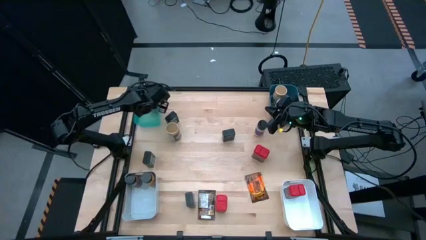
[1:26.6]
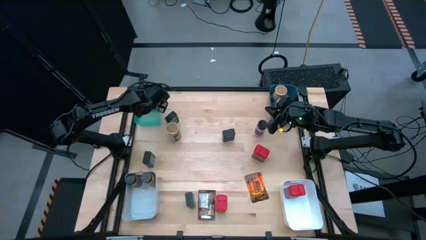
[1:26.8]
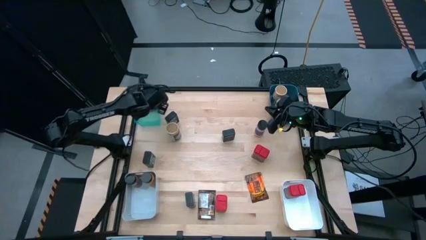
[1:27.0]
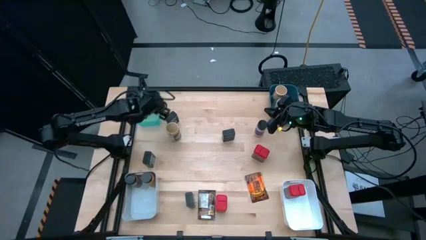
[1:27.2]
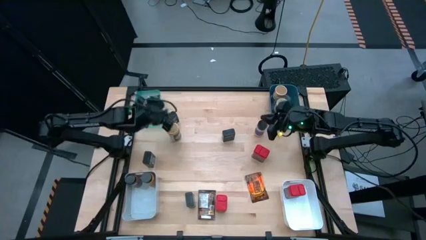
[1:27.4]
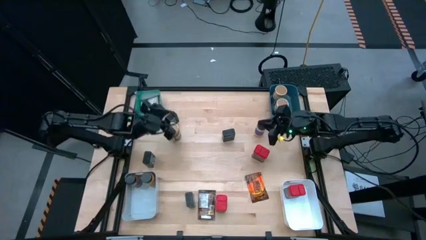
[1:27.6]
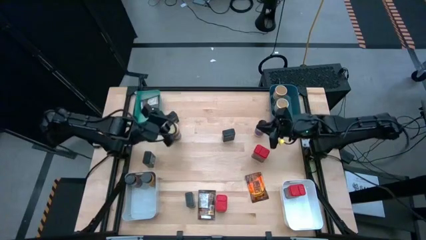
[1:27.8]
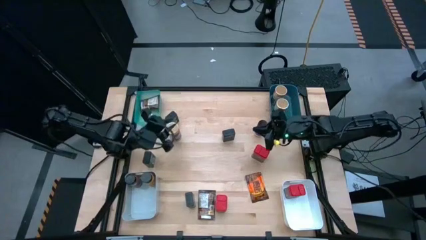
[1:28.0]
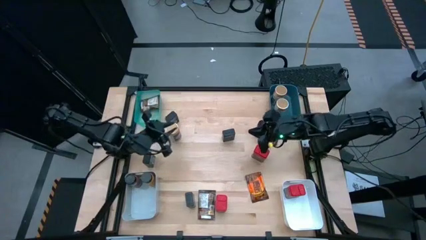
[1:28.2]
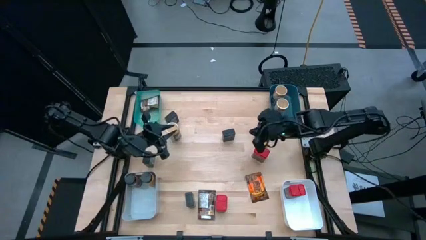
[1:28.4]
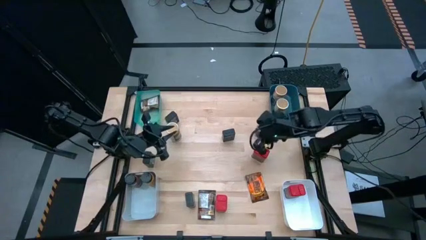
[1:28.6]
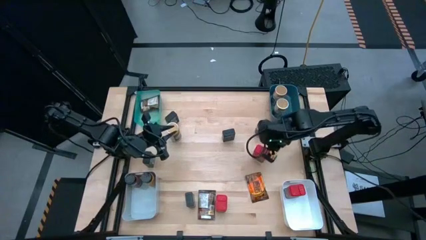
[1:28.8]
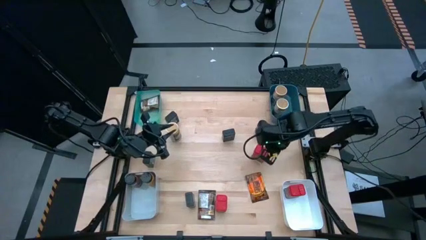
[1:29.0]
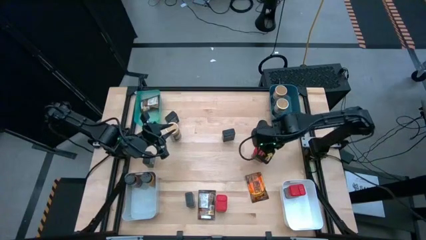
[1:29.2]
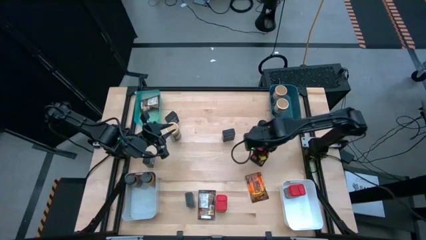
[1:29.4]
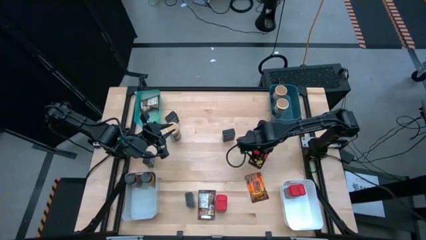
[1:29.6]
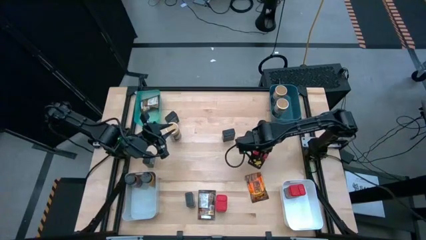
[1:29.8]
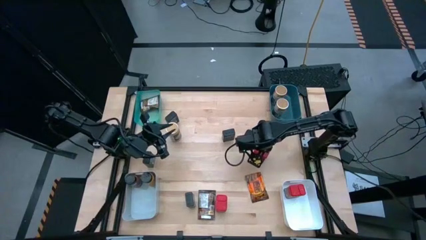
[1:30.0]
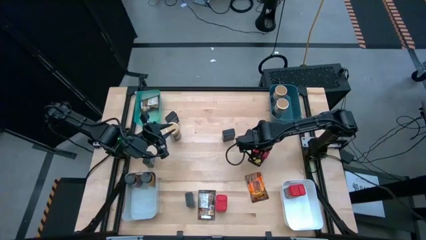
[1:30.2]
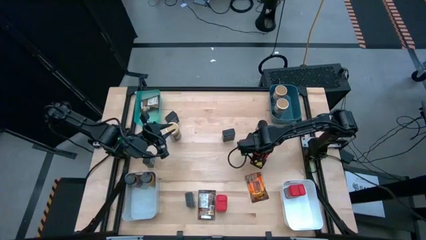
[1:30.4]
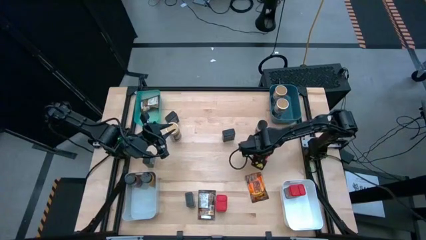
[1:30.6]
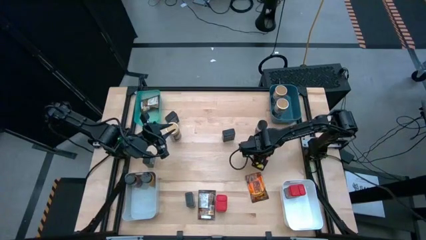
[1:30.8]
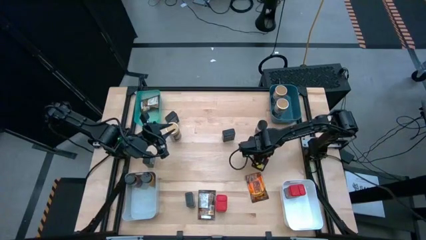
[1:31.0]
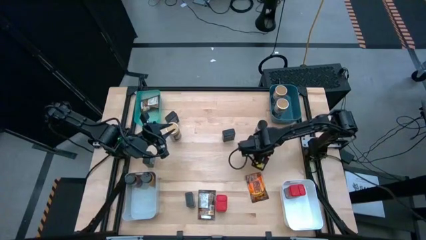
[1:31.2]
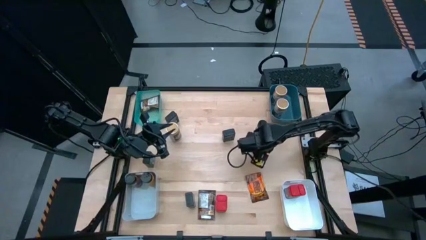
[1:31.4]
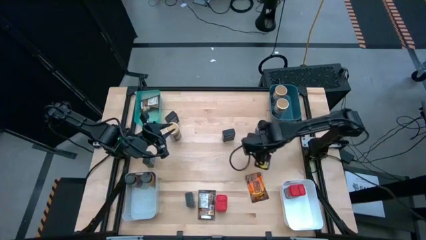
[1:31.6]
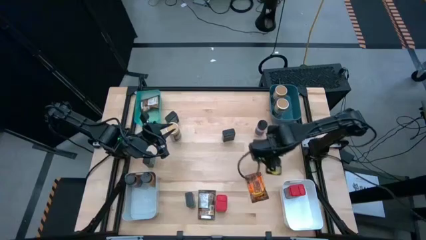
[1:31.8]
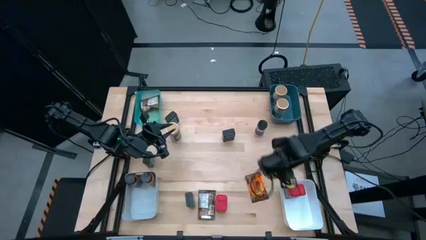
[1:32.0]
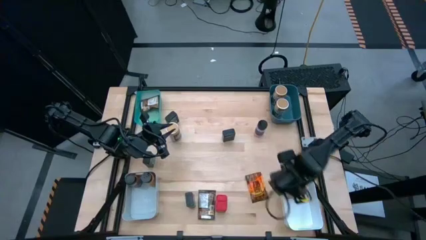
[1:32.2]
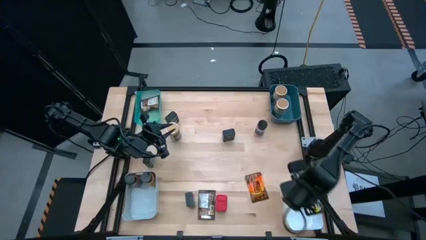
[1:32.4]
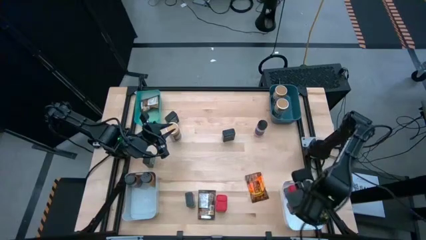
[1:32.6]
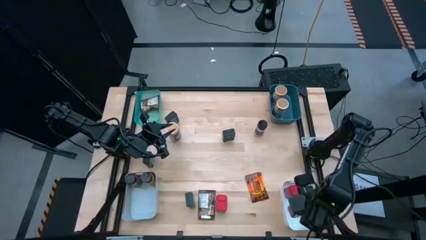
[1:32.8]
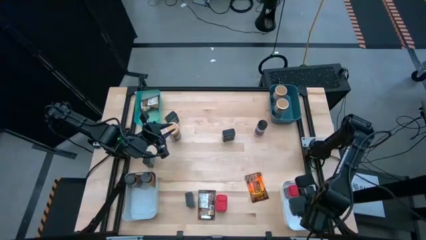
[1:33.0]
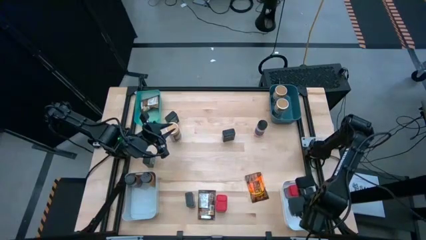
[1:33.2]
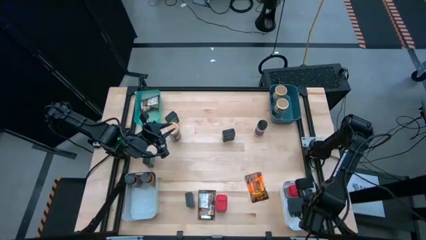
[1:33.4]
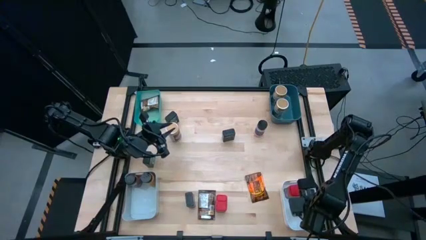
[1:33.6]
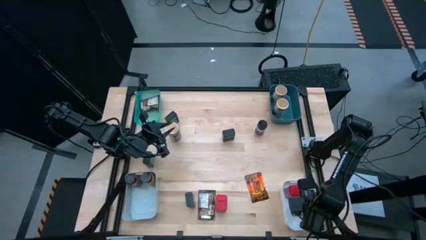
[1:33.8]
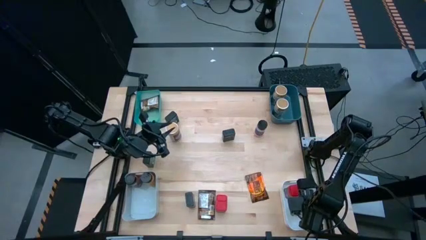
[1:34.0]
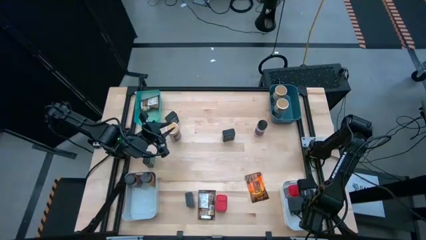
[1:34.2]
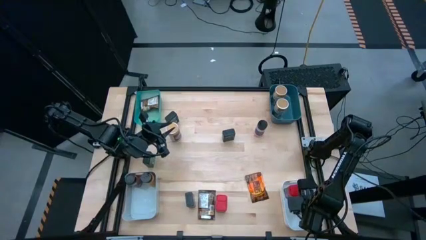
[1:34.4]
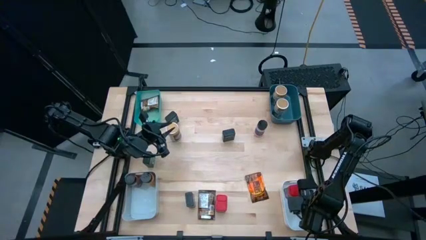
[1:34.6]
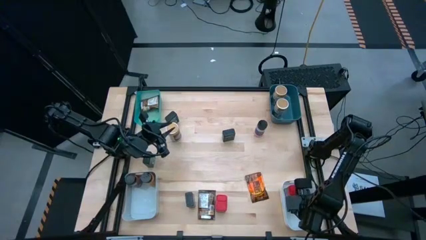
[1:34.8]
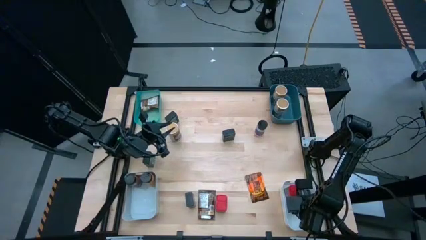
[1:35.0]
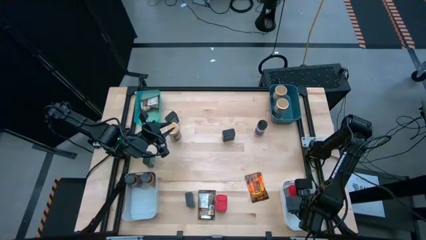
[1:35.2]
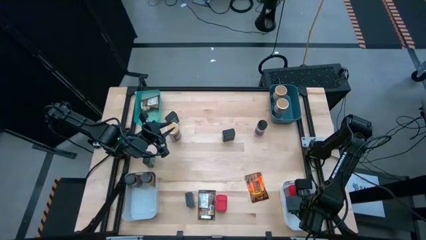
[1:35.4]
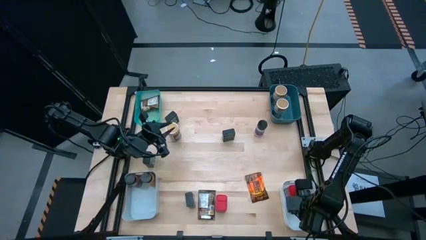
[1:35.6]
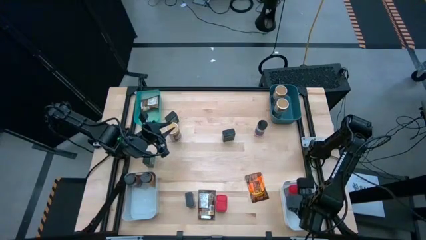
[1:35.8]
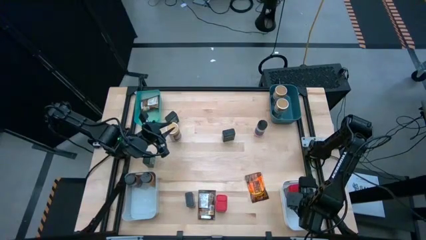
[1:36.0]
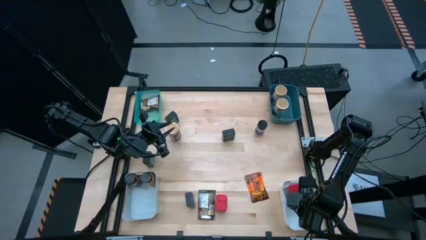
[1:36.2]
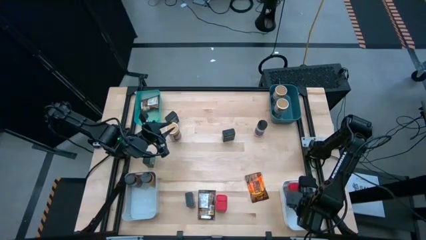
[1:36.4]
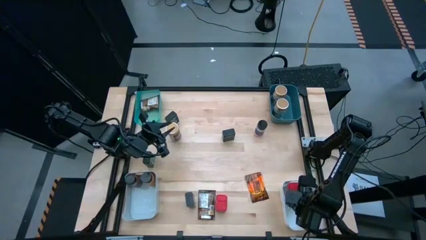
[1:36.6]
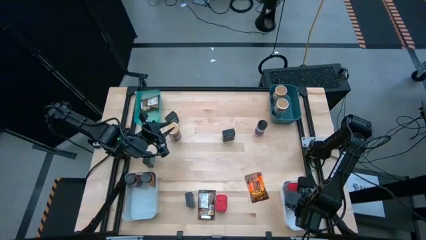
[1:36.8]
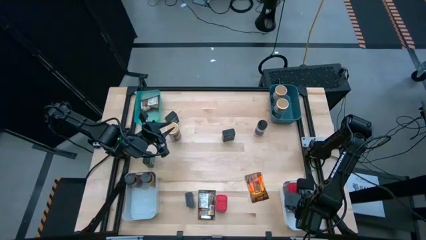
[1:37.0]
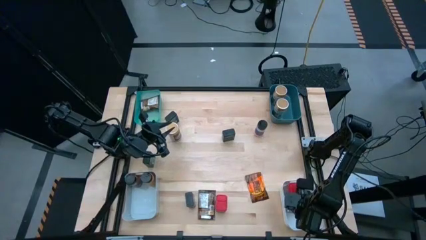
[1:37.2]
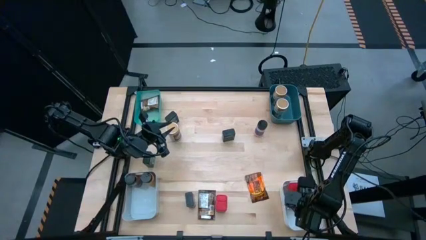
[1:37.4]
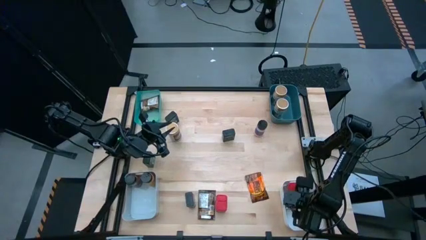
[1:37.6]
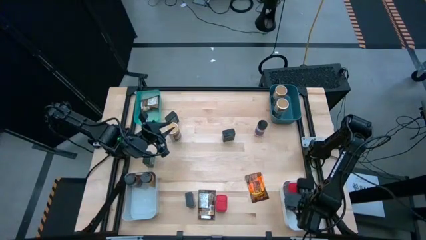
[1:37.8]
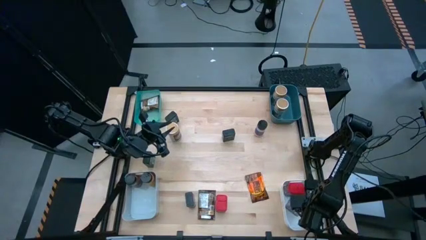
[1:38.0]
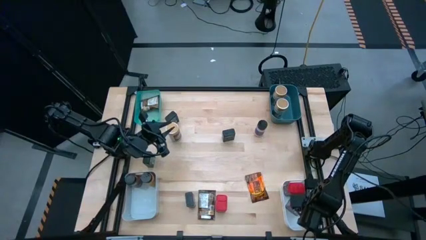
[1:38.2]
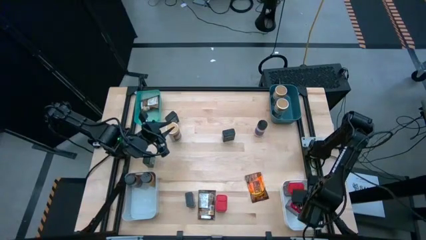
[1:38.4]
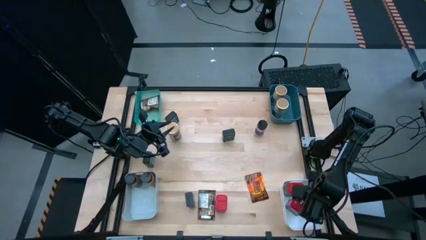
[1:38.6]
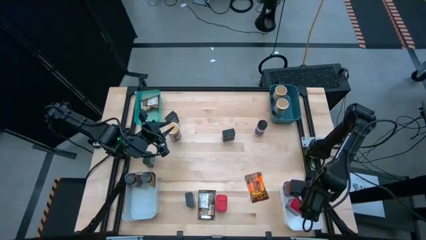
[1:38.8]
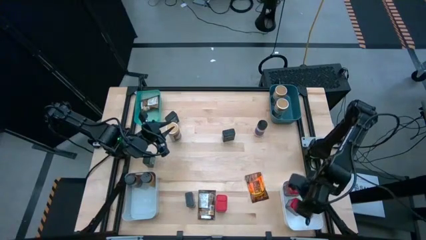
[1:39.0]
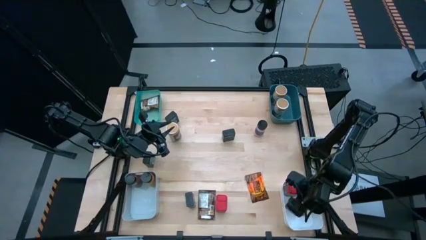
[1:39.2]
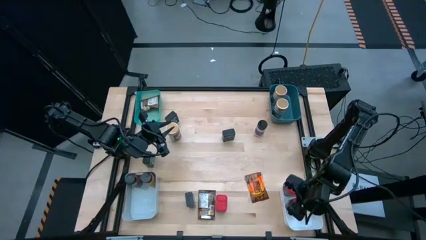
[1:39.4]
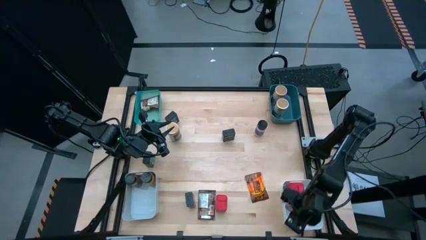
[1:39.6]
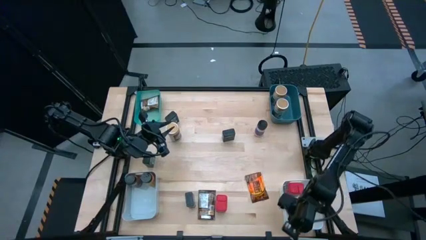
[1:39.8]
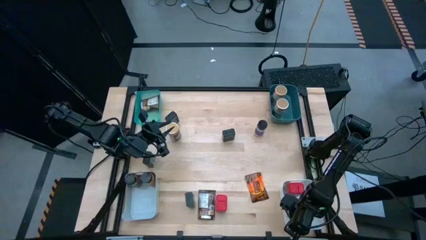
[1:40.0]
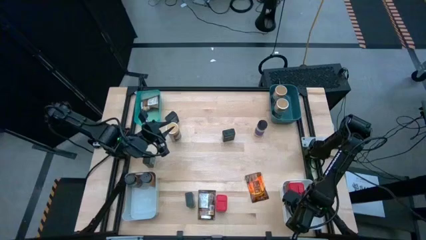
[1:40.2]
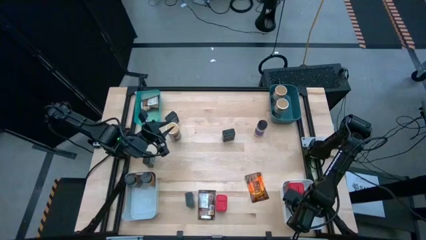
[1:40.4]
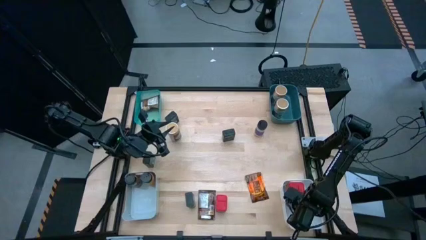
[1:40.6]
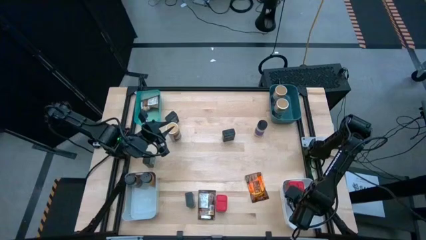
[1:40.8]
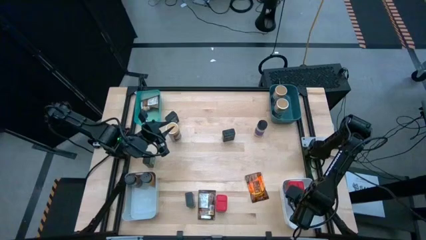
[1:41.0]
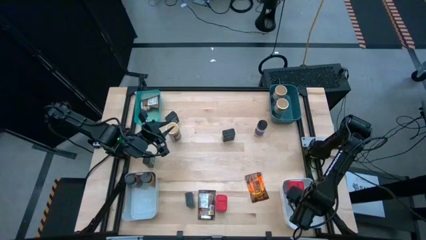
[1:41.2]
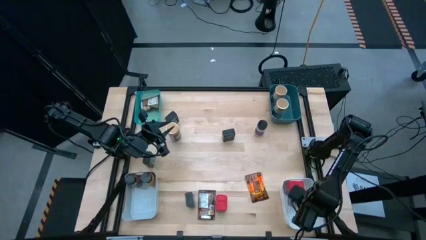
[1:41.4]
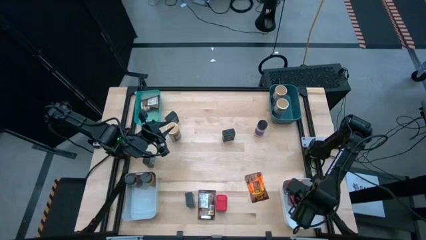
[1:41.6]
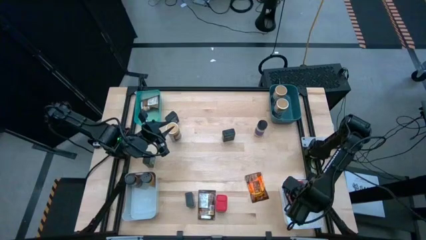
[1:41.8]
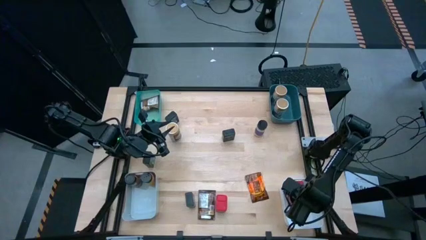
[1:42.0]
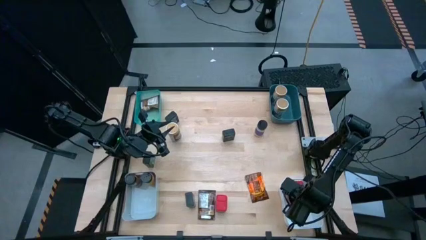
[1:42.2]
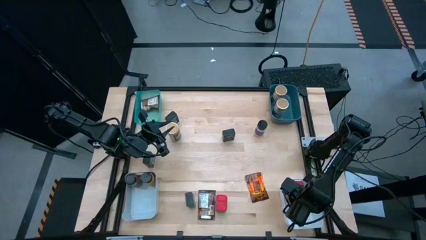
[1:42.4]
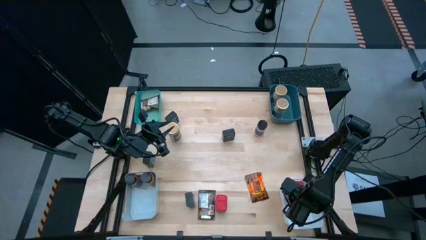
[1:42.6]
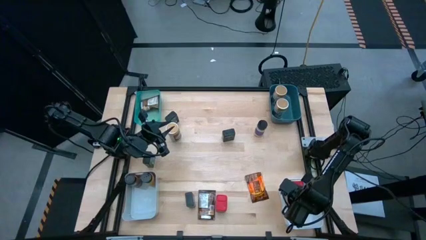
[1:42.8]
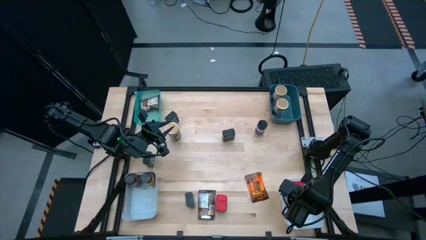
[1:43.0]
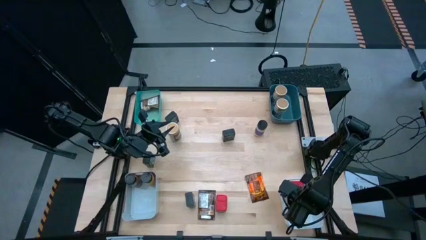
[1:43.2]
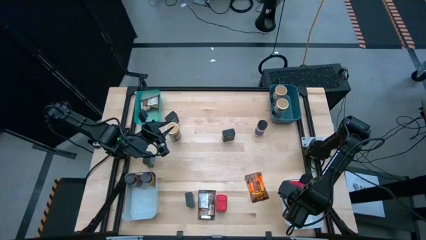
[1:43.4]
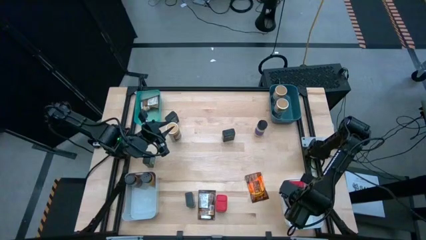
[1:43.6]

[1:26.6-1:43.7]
Task: Sort spices by type
Put the top red seasoning can into the white bin
